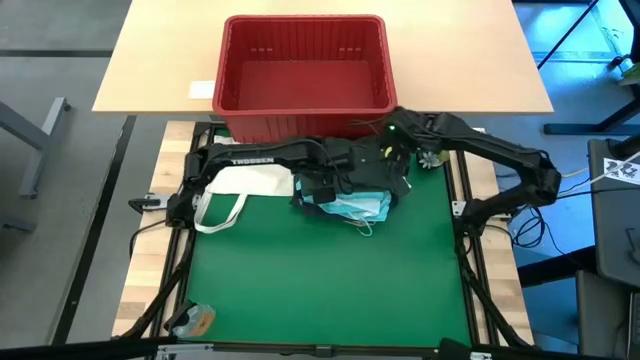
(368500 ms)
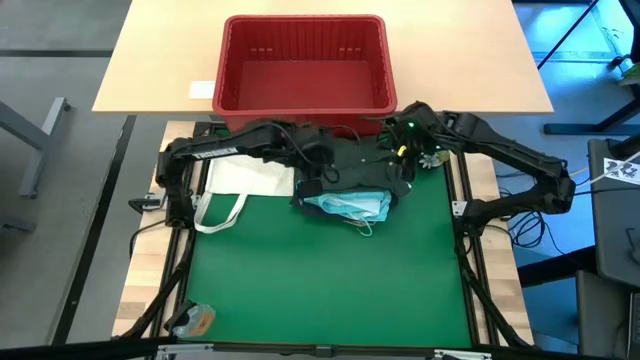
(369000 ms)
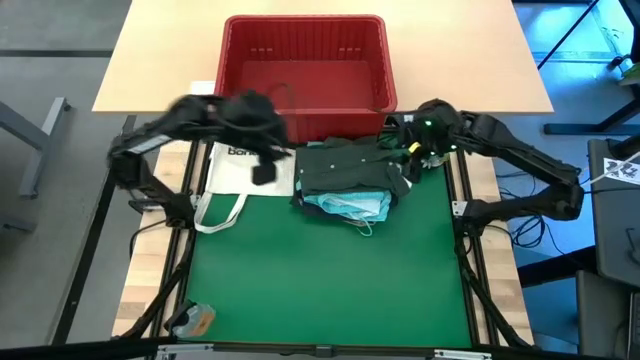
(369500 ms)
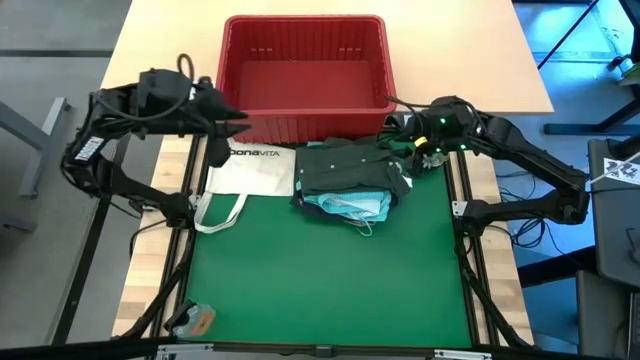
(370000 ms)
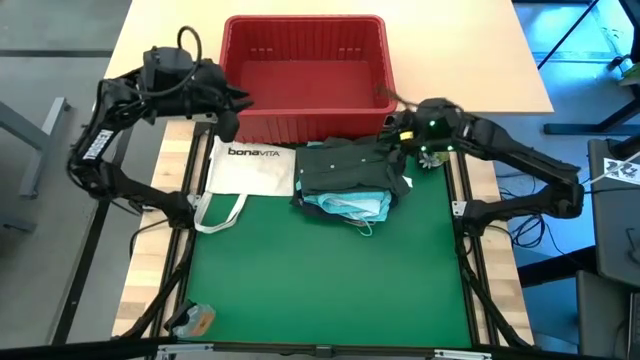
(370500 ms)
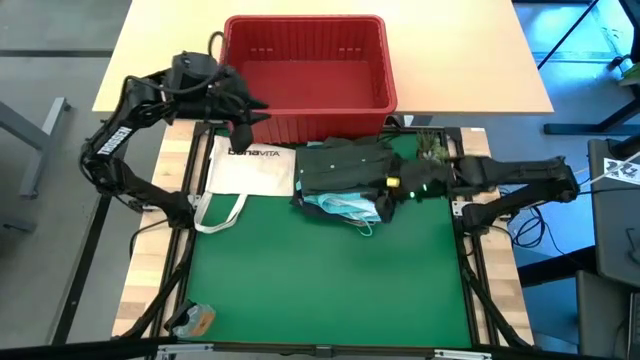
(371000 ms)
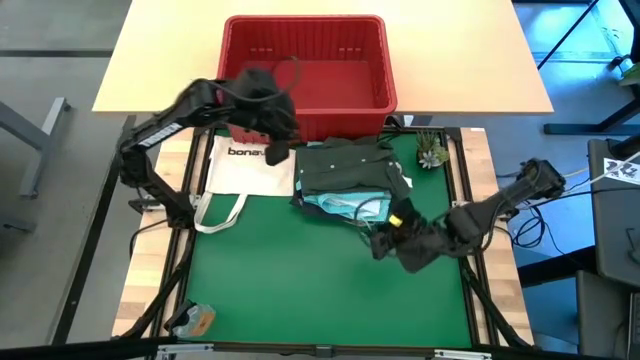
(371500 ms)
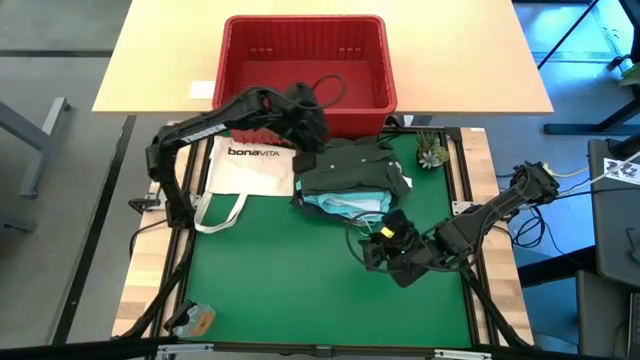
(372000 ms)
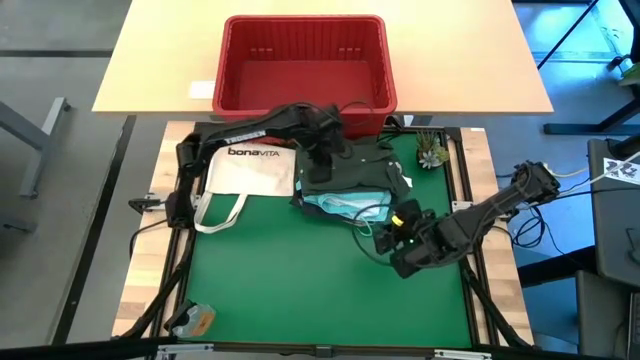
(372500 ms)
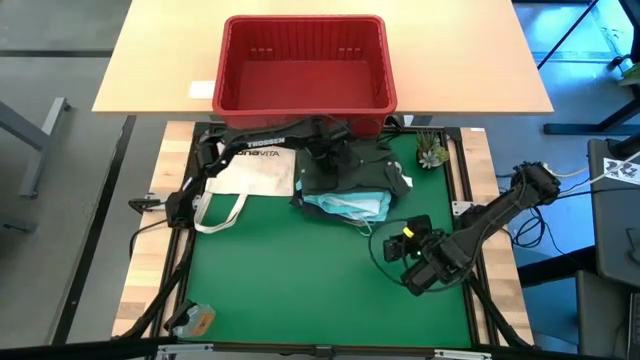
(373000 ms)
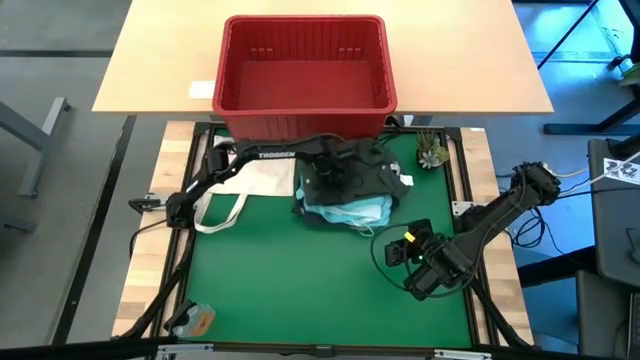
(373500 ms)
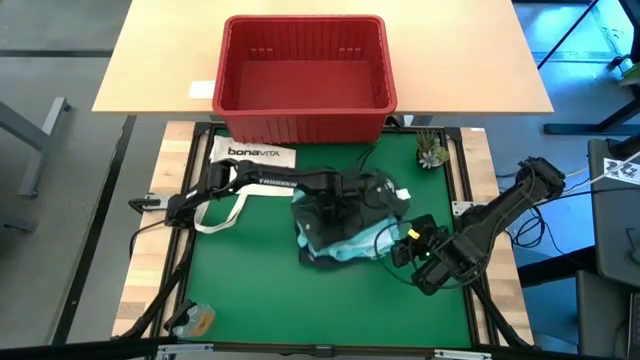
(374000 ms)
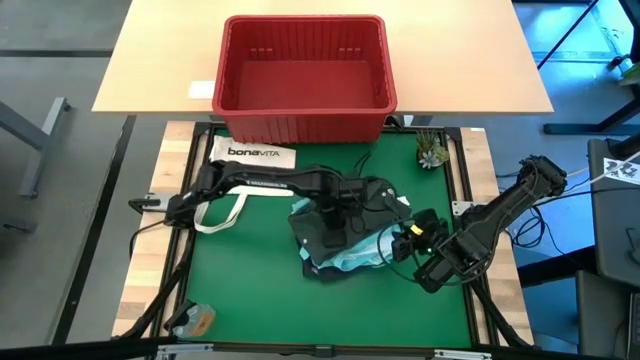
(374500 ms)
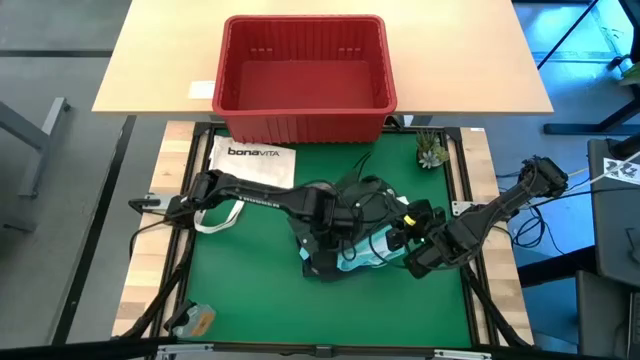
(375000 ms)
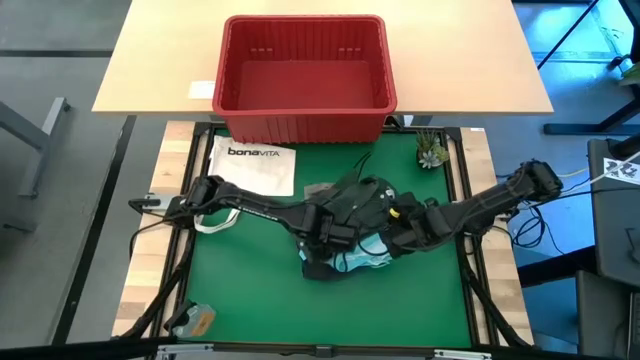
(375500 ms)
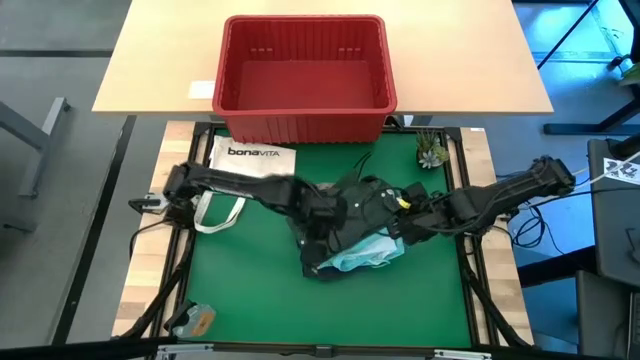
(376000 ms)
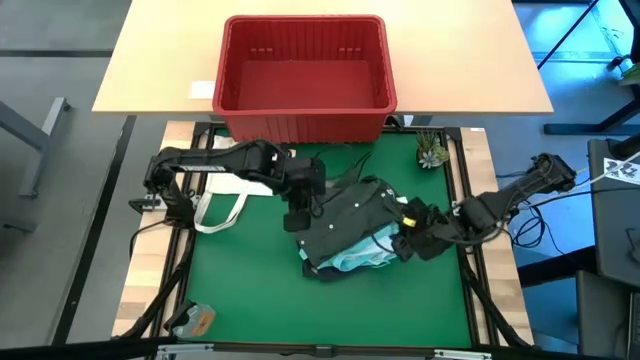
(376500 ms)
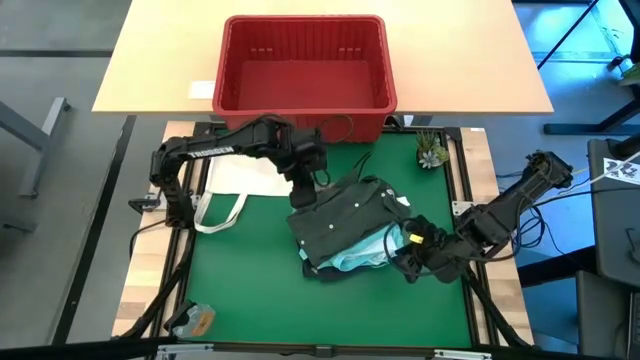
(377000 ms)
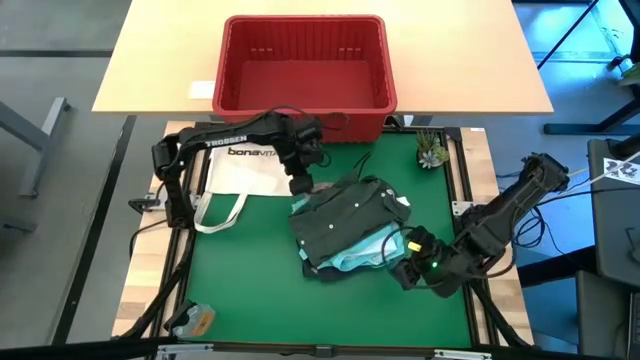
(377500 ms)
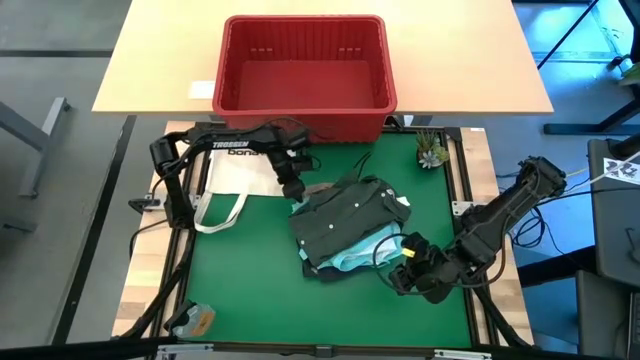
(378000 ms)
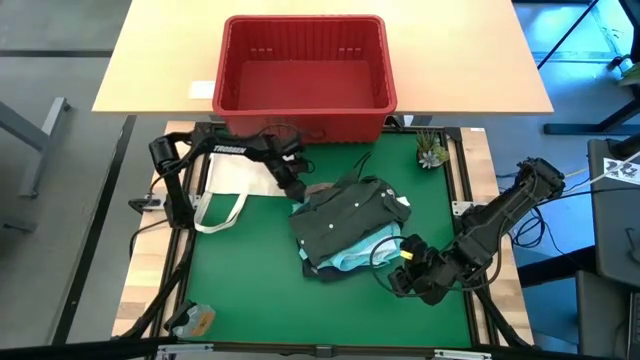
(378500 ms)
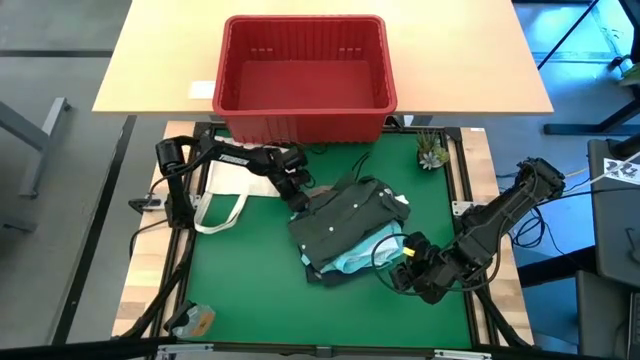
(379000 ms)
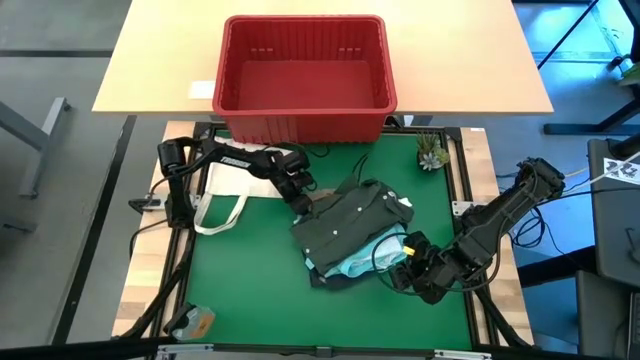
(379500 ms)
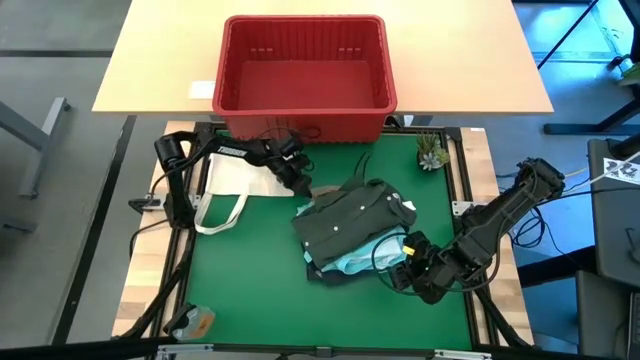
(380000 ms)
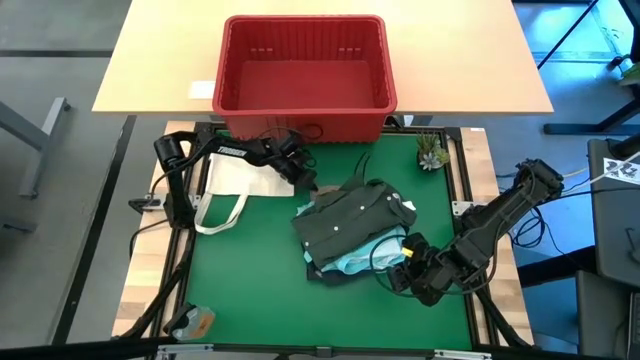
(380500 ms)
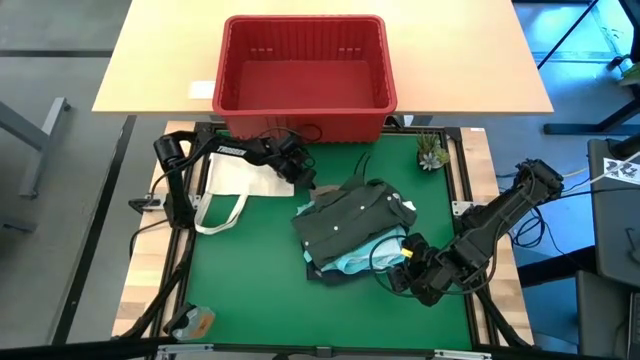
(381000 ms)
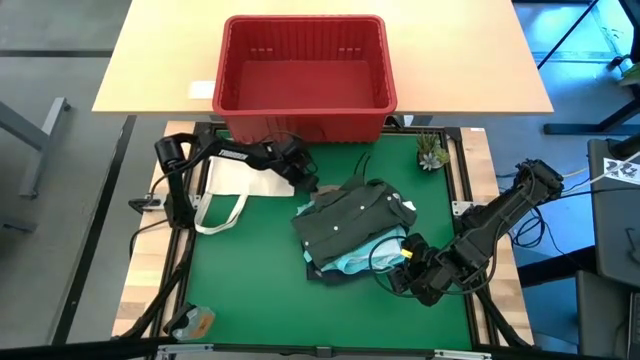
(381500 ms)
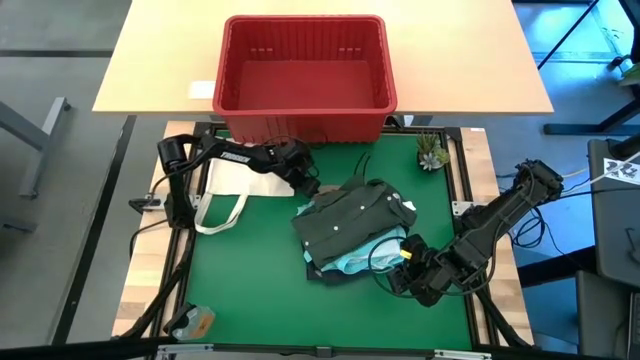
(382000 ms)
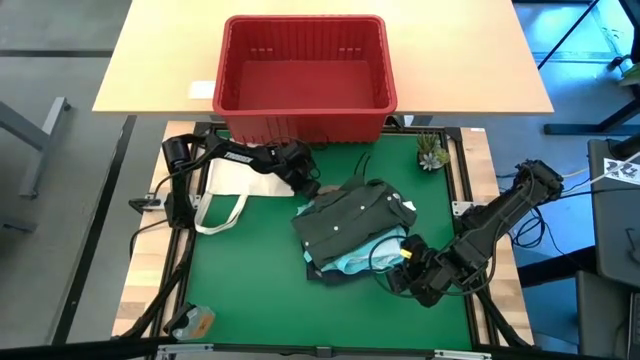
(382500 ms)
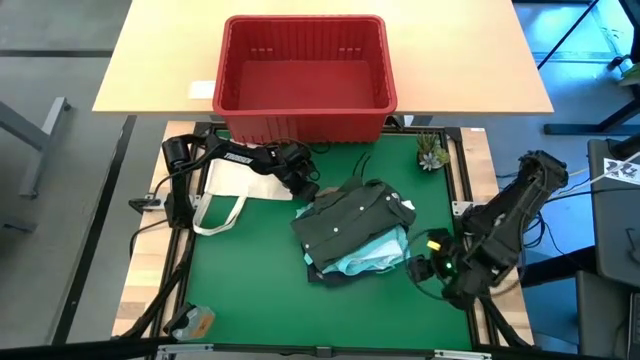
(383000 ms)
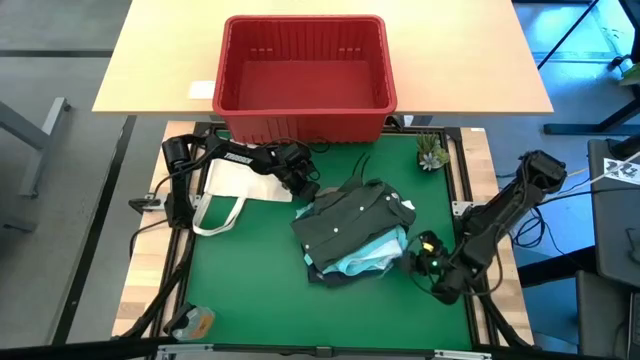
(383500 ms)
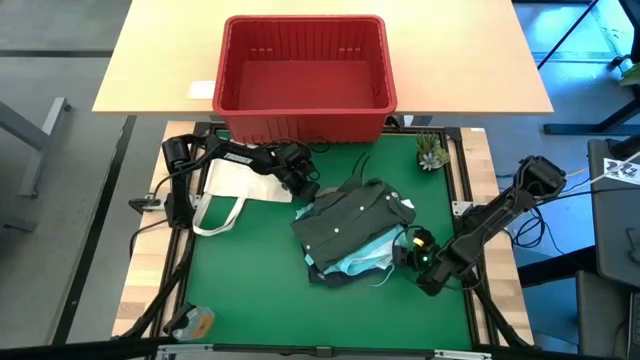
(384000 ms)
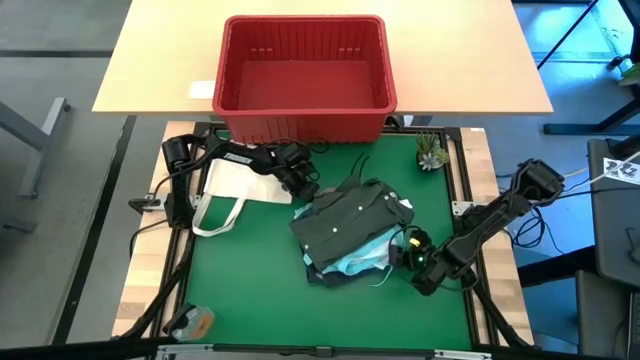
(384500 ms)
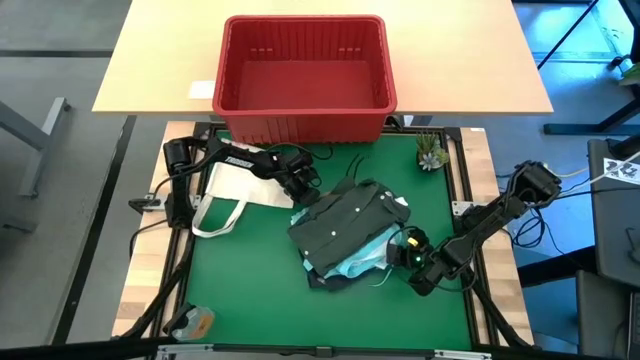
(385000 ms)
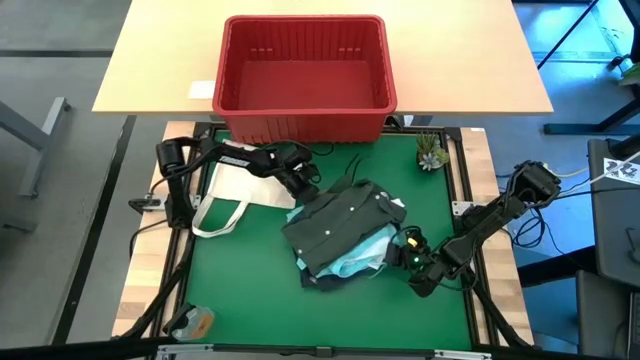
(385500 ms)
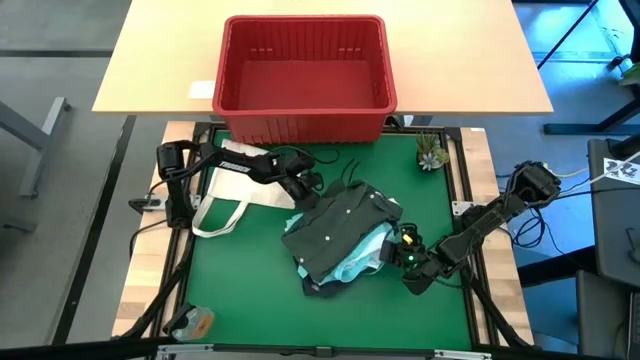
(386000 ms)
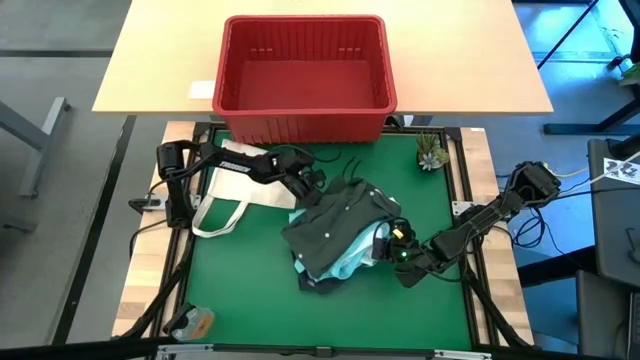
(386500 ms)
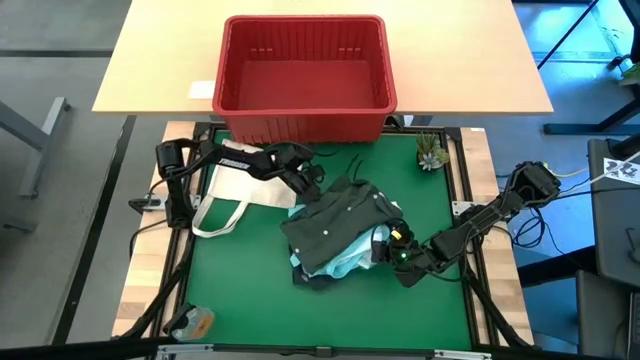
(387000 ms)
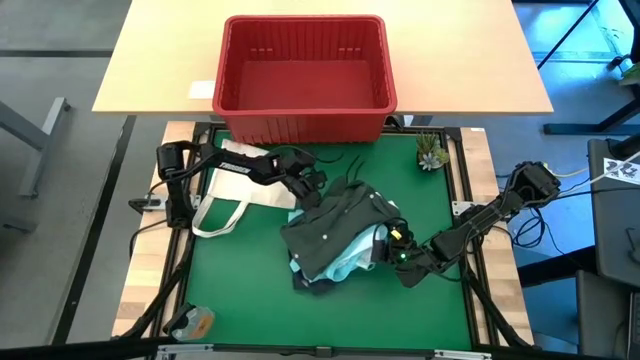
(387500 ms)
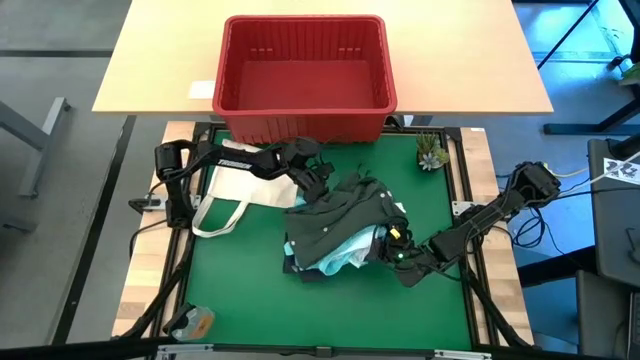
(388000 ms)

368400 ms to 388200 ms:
Task: Fold Laundry from Bin
Put the stack clothes into the red laundry bin

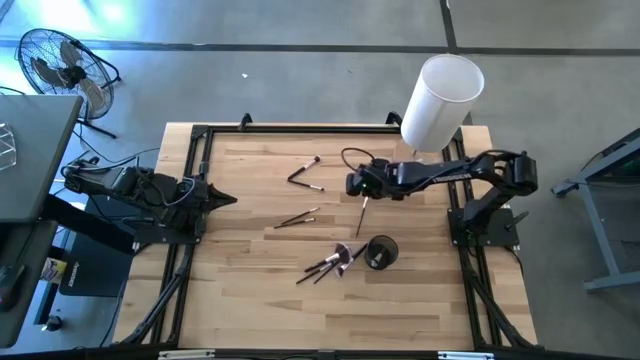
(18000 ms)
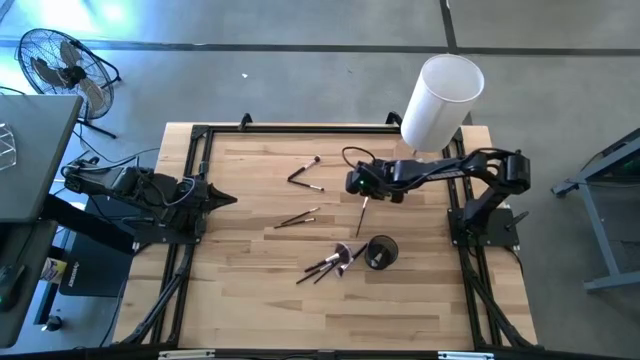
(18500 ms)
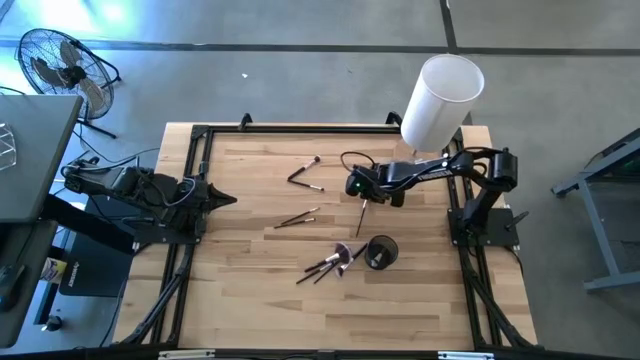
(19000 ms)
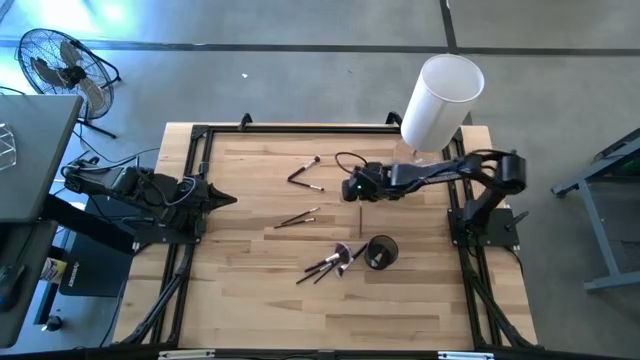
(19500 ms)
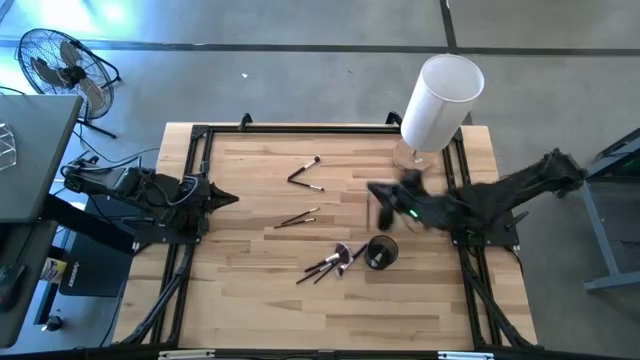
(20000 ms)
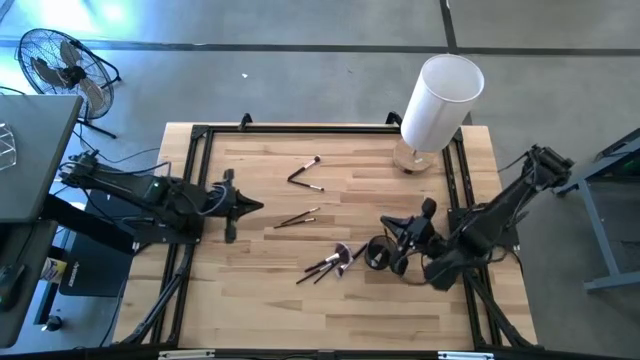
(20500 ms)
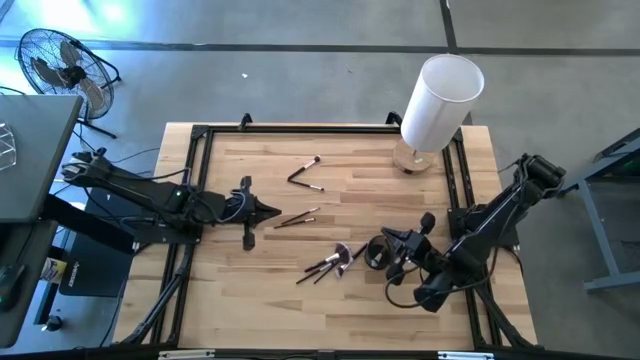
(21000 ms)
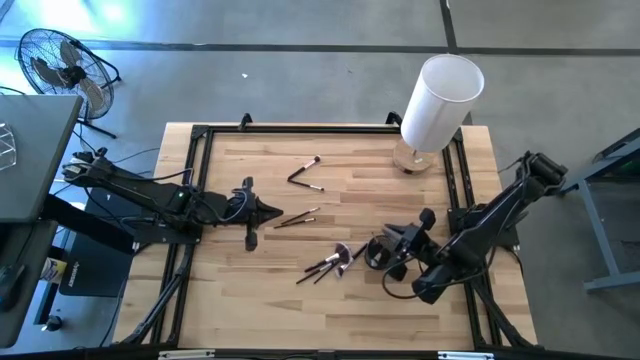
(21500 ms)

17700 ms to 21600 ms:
Task: Put items in baskets/containers
Put the eyeshadow brush into the mesh organizer
